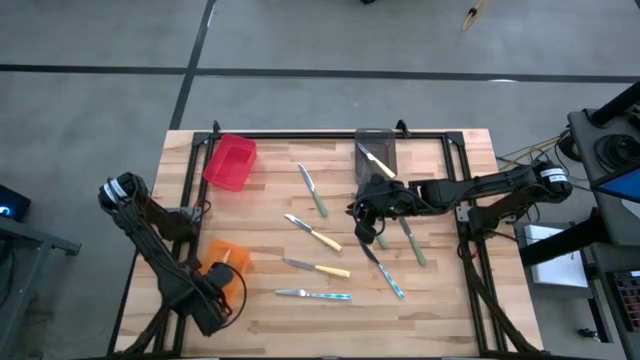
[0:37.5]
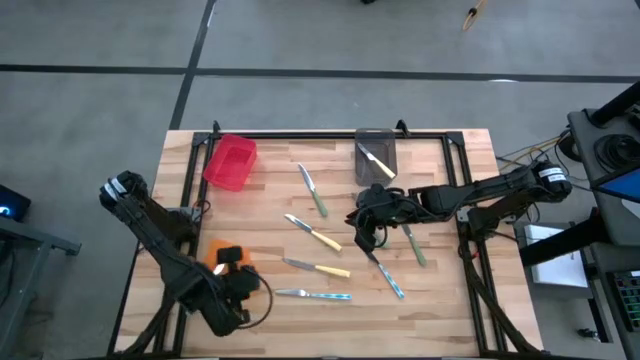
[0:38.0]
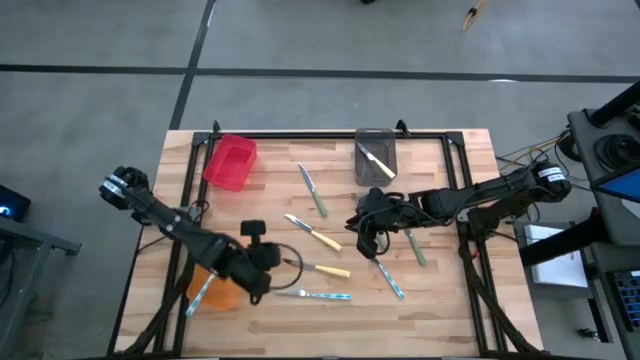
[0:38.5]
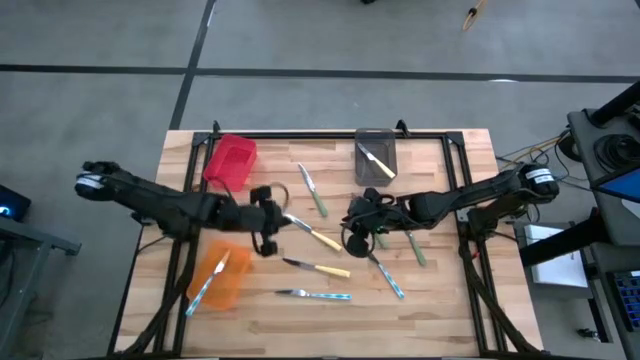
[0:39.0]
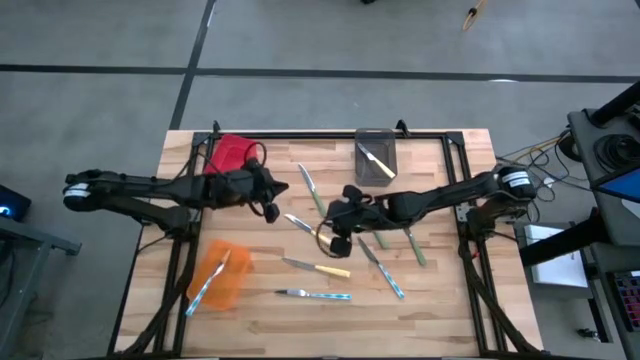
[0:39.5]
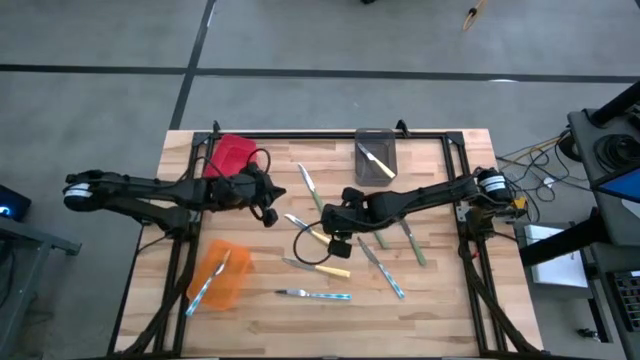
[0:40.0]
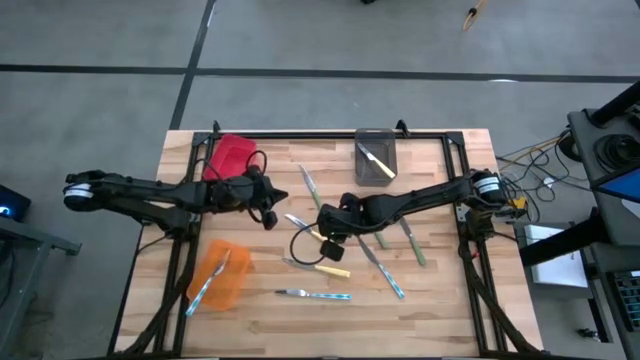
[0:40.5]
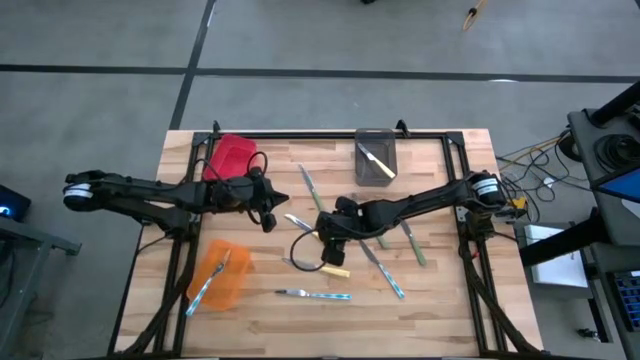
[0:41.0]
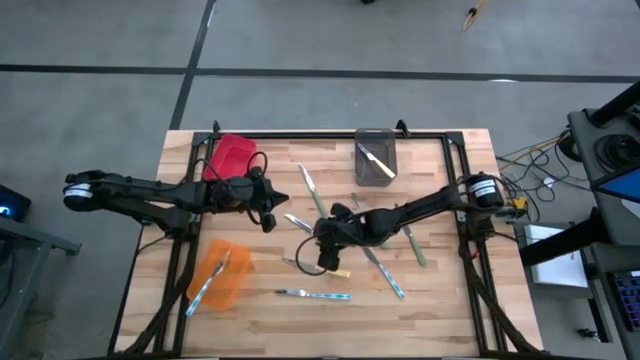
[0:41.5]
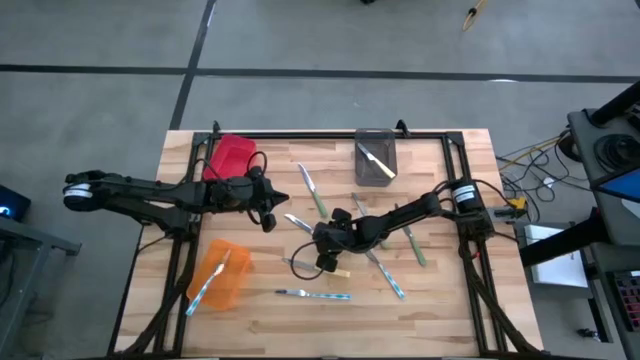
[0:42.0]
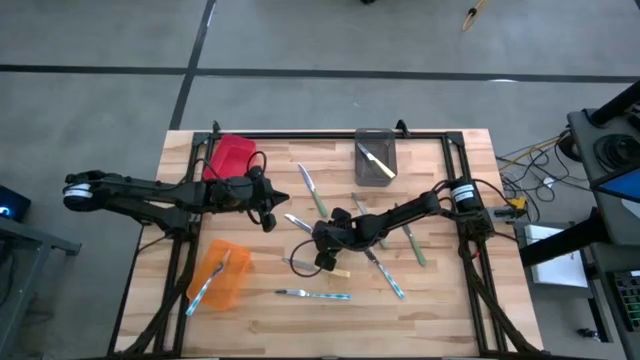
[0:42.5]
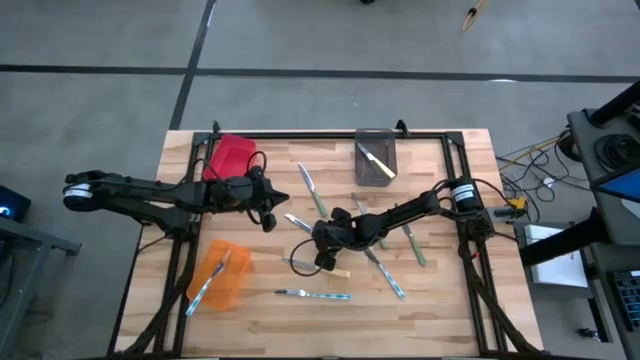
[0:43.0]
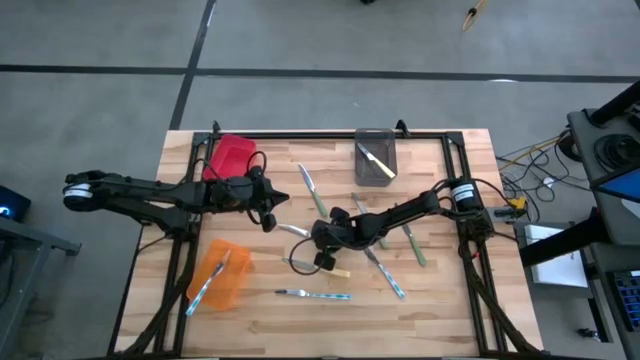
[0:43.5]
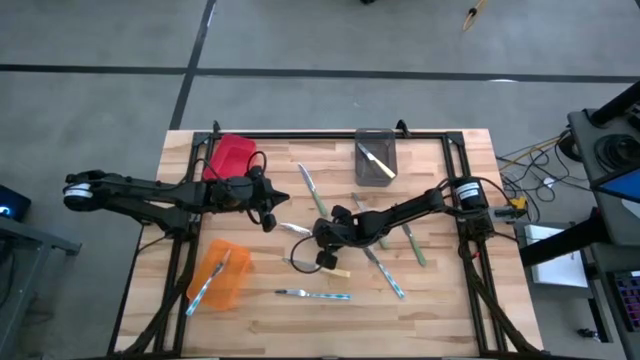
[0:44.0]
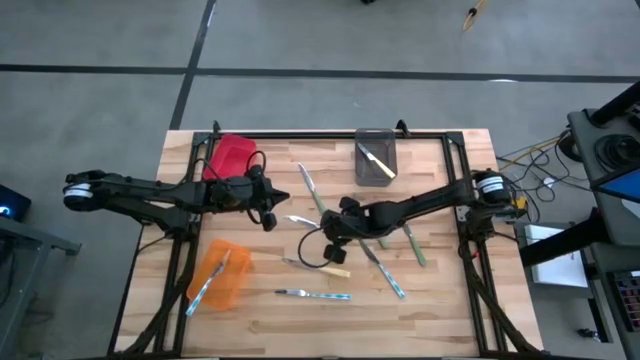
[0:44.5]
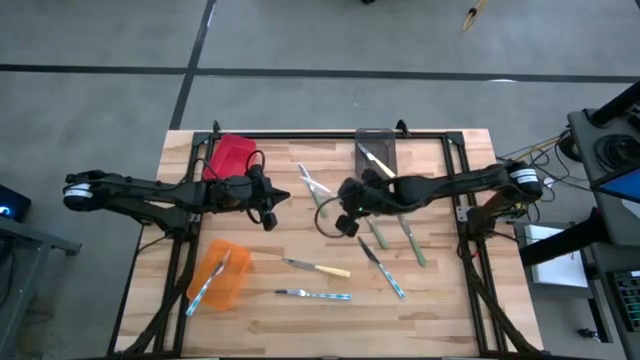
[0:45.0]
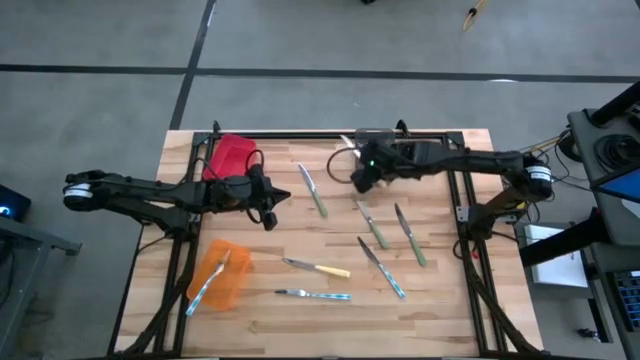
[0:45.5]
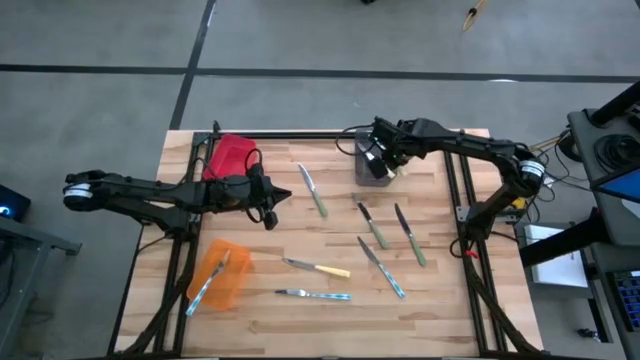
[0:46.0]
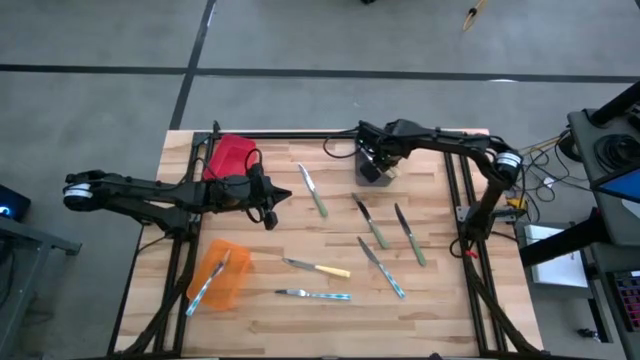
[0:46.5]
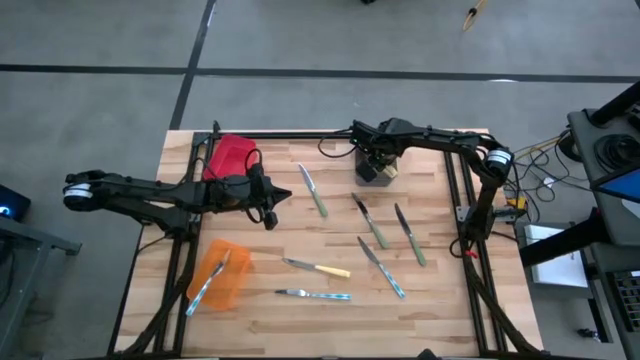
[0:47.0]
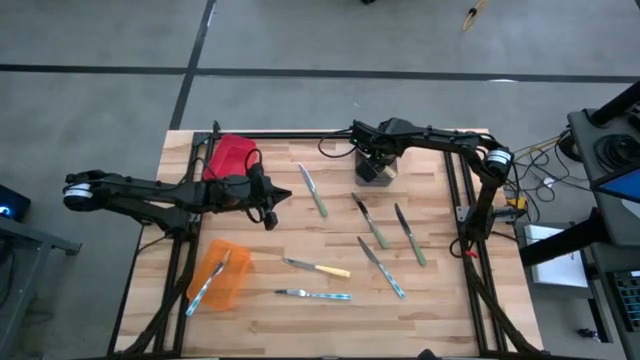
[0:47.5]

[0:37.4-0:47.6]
Task: Sort silverware by color (type)
Put the top yellow knife into the black bin

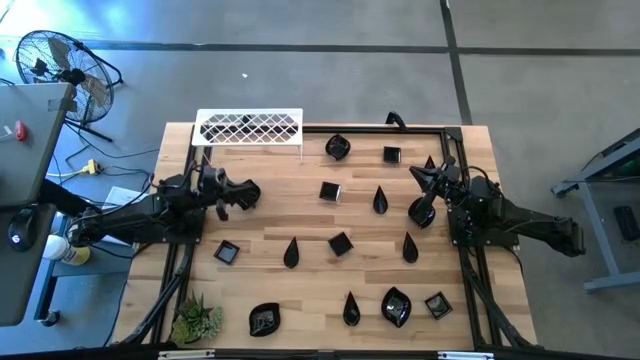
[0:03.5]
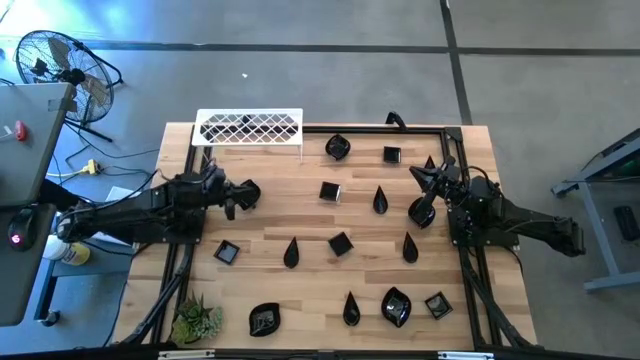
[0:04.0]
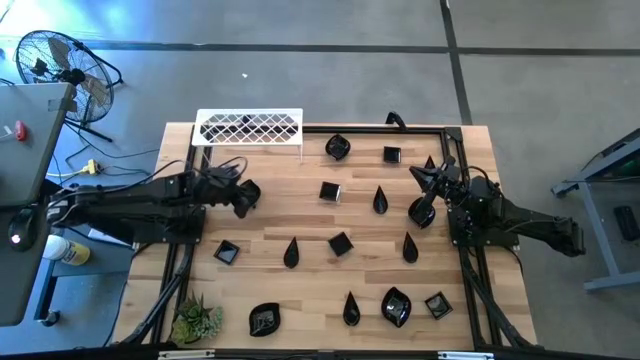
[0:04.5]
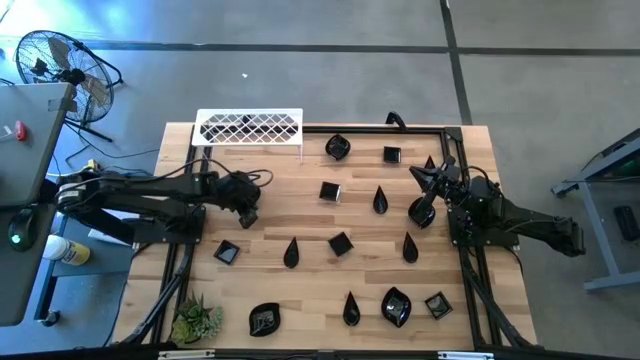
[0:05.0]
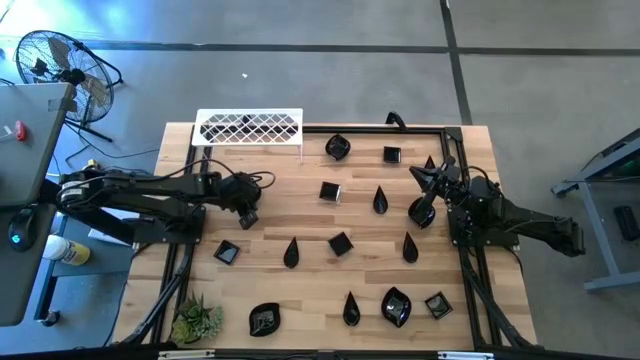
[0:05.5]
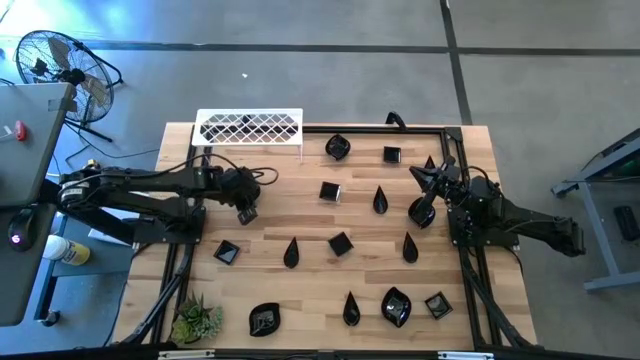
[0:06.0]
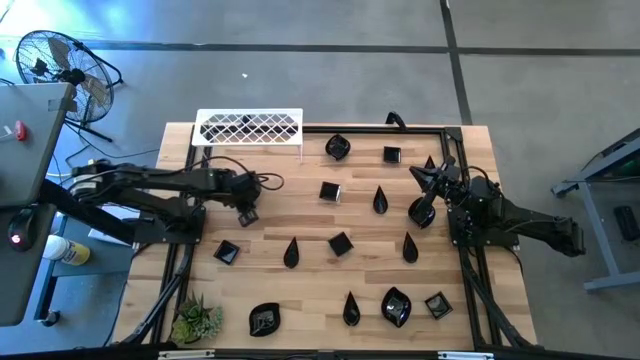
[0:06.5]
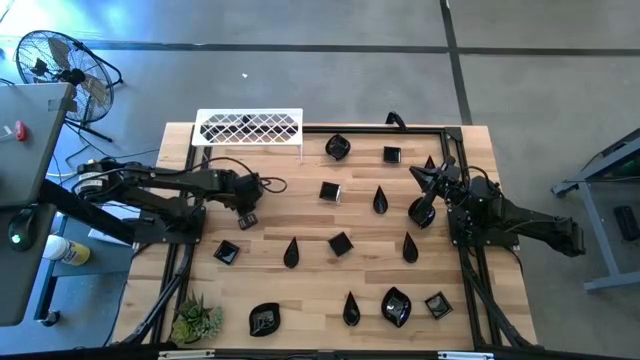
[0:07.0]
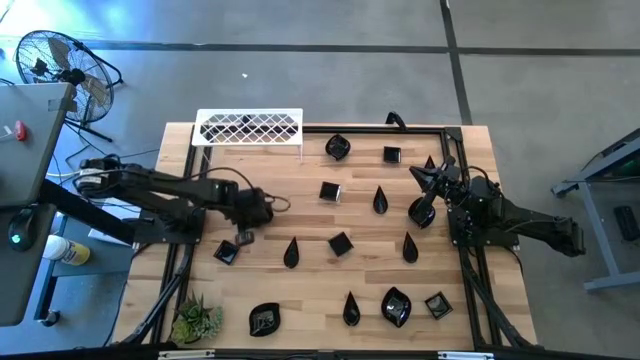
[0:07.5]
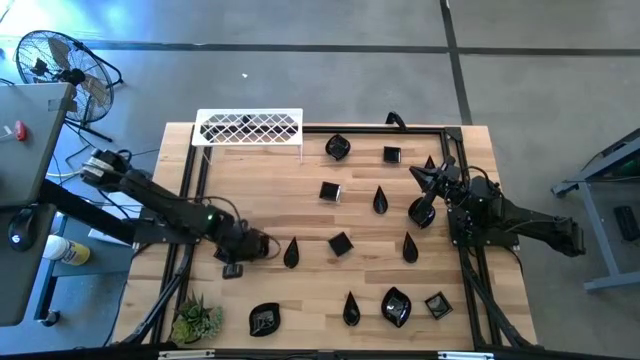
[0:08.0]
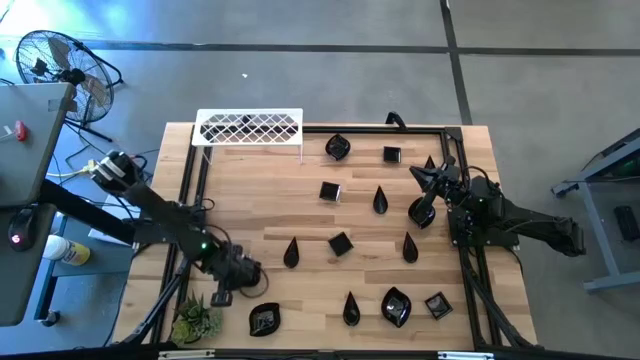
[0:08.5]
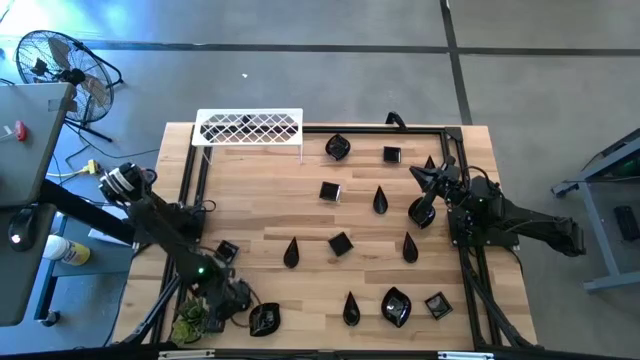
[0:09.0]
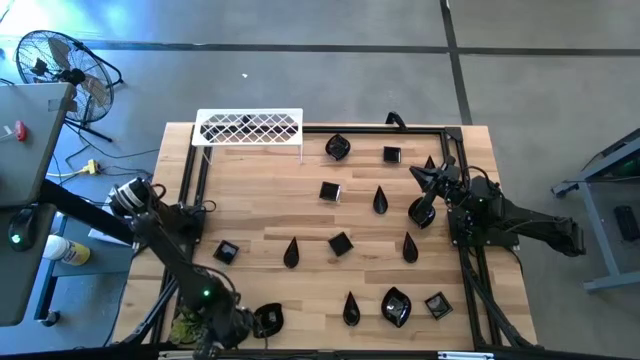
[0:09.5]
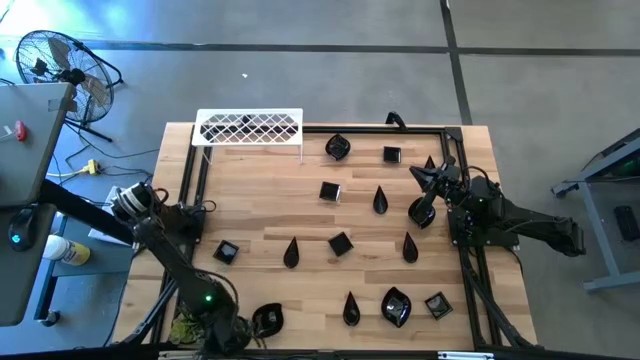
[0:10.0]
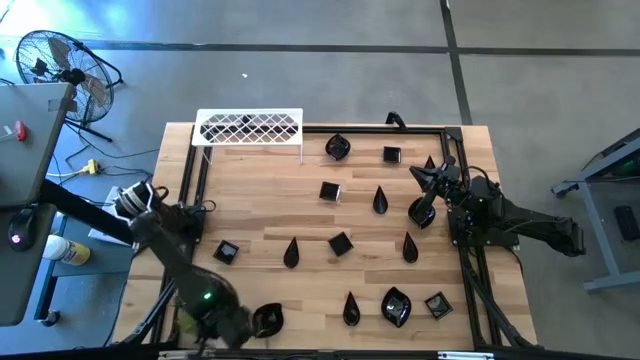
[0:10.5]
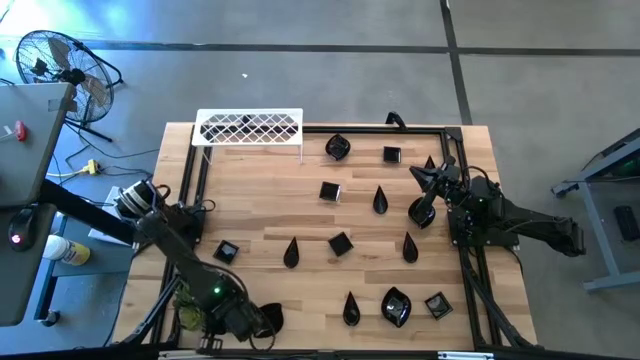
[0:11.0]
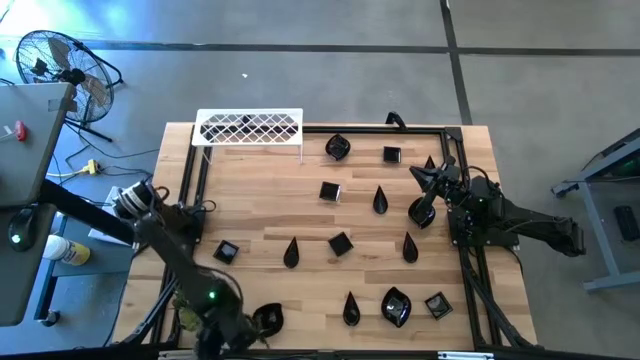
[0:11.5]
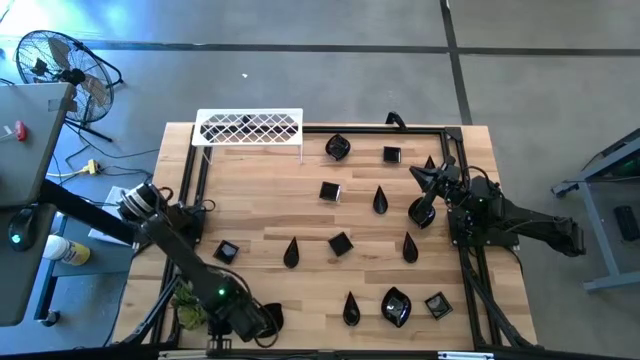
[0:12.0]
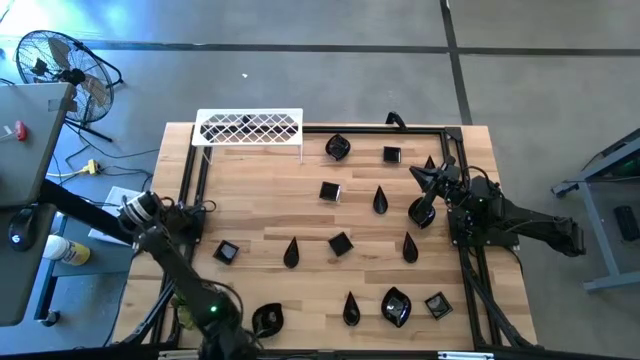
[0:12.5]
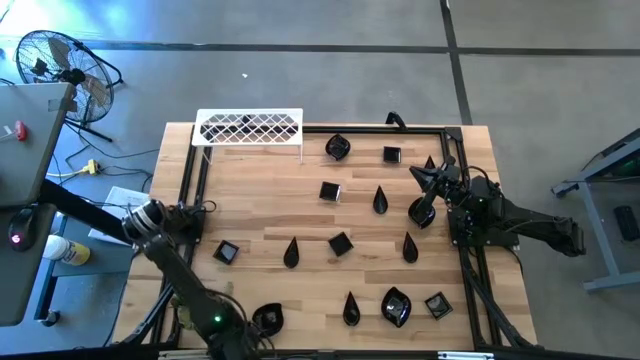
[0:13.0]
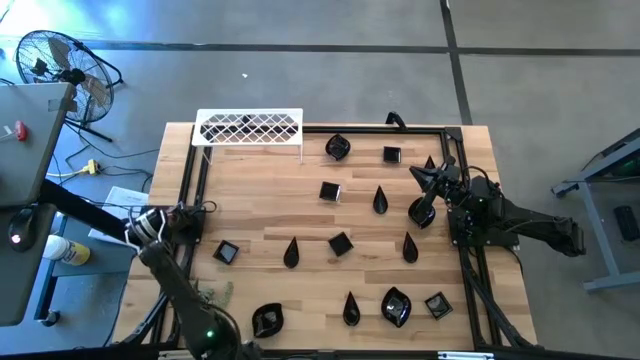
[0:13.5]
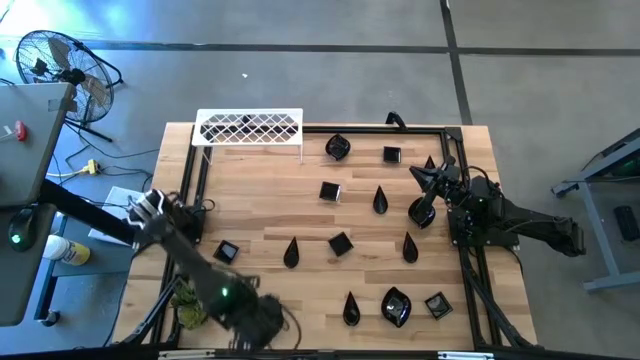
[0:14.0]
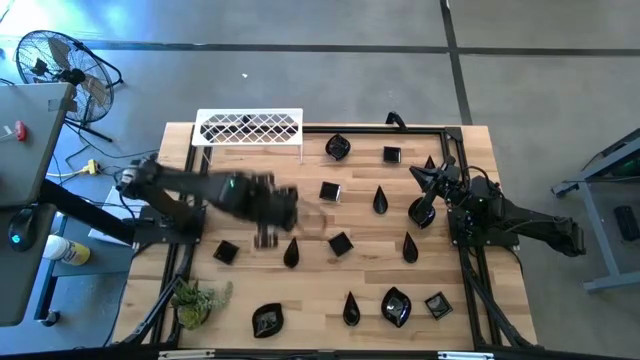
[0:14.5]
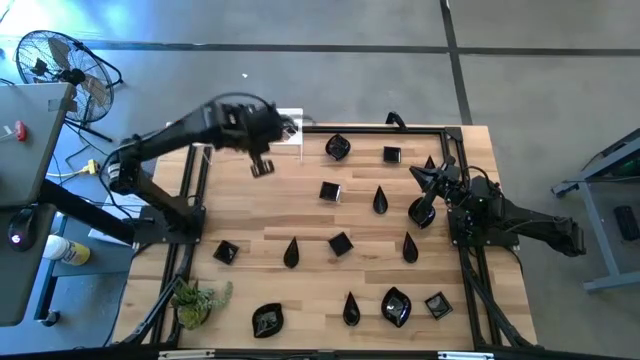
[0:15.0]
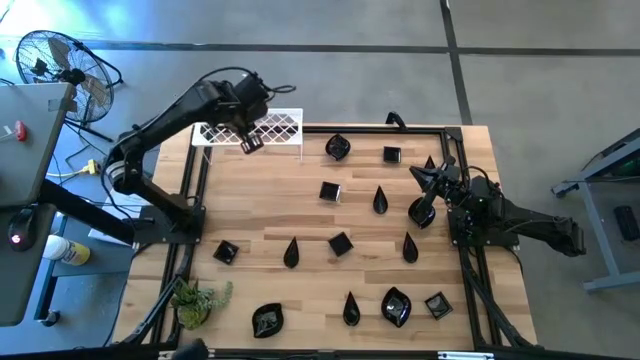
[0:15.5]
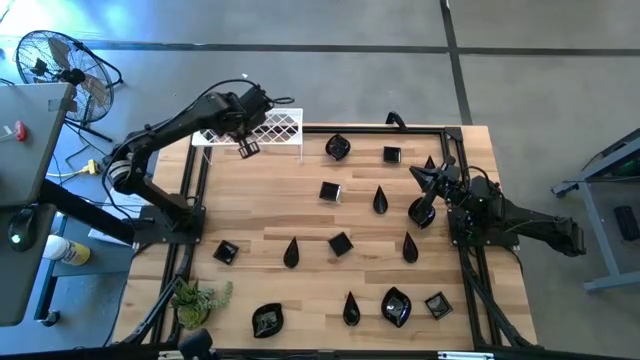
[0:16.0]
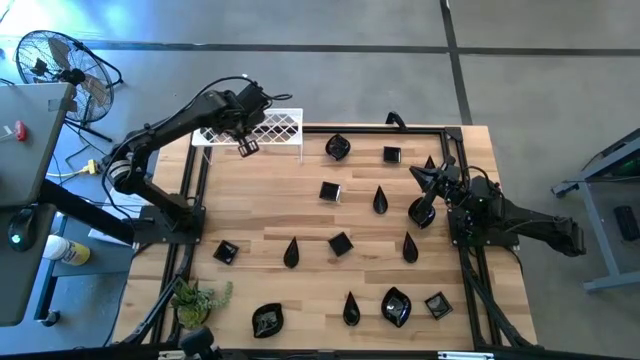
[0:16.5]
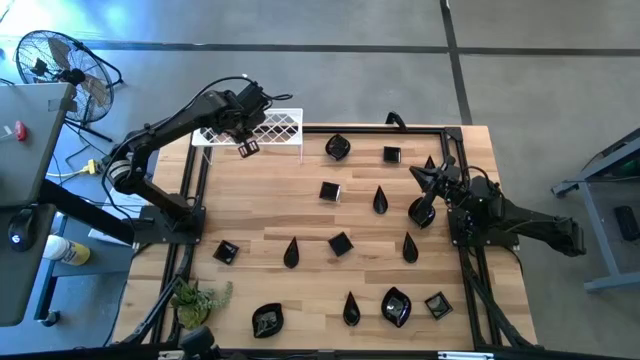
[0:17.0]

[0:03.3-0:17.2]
Task: Pick & Place Mini shaped plates
Put the leaf-shaped plate on the shelf
